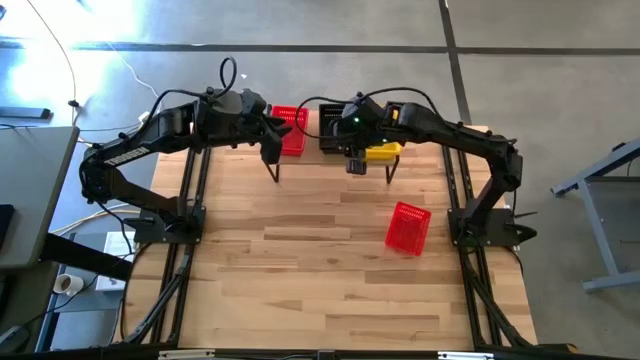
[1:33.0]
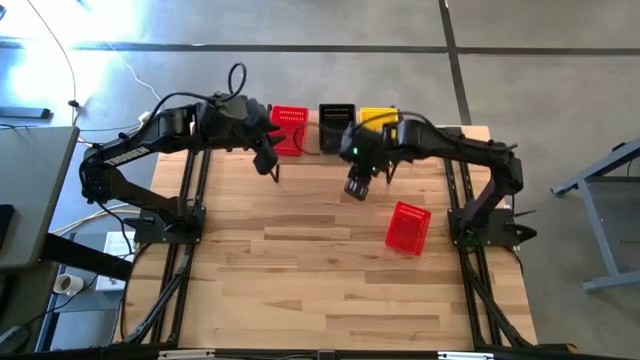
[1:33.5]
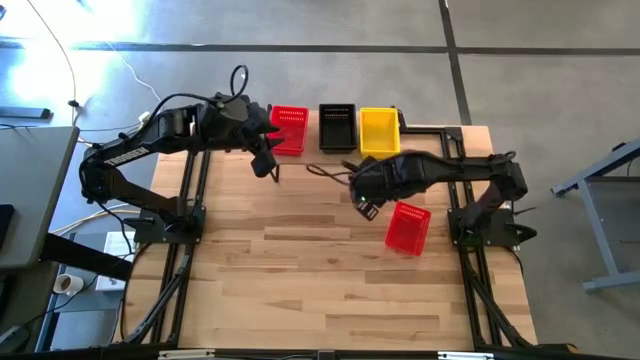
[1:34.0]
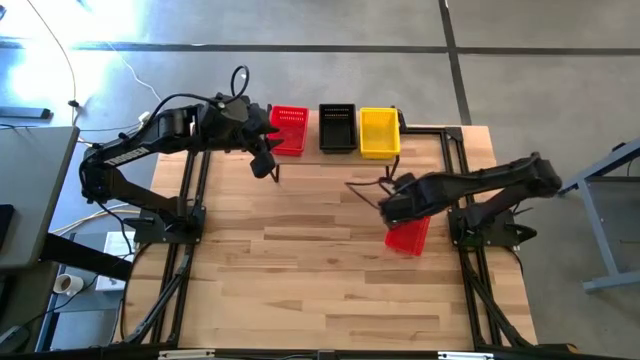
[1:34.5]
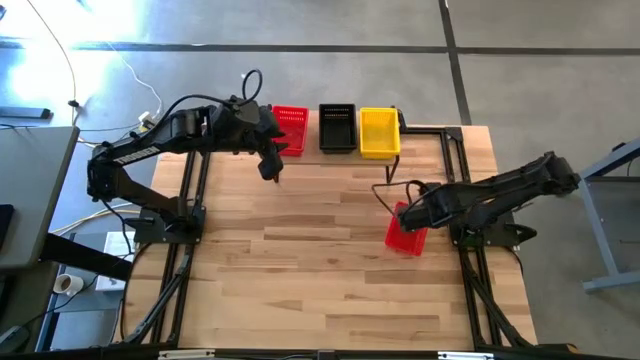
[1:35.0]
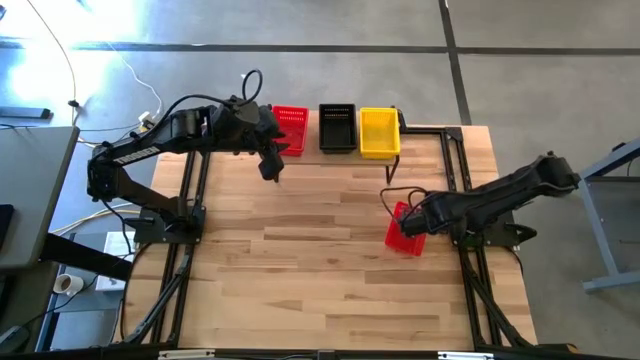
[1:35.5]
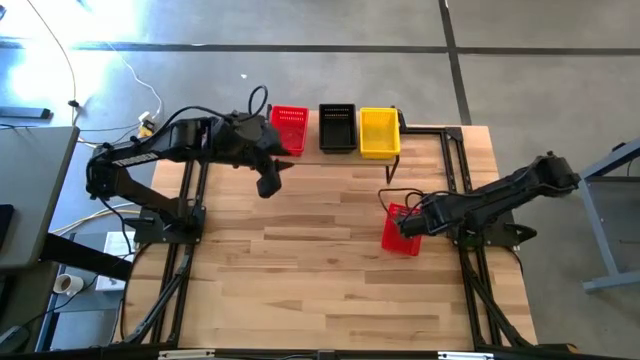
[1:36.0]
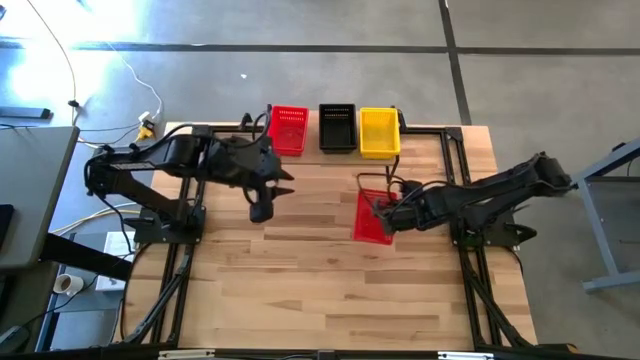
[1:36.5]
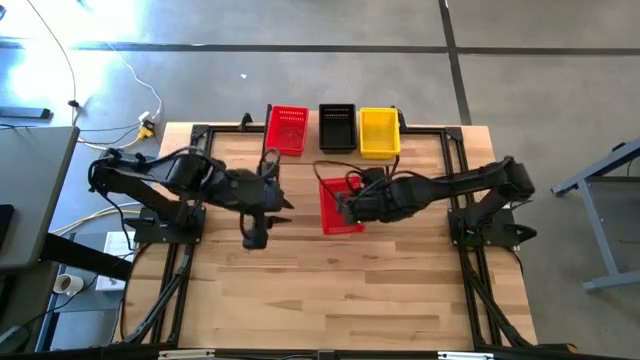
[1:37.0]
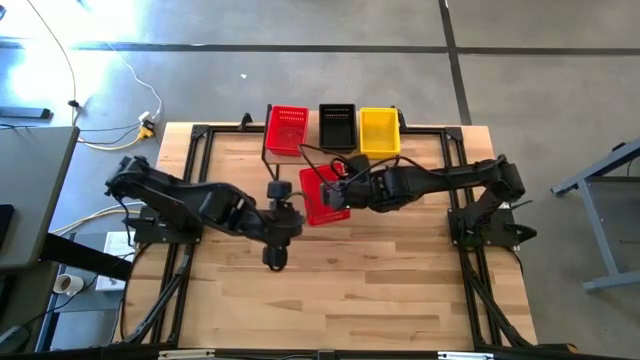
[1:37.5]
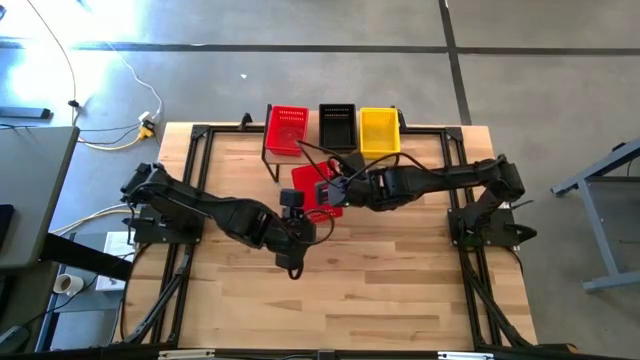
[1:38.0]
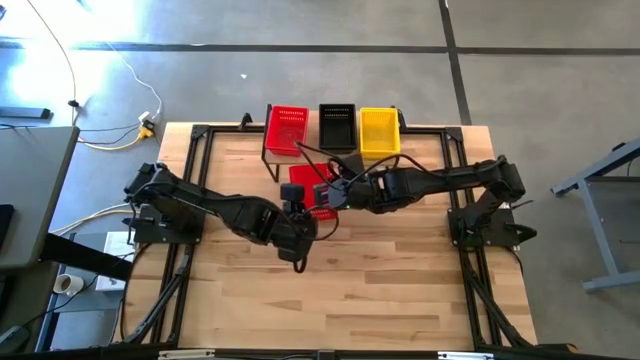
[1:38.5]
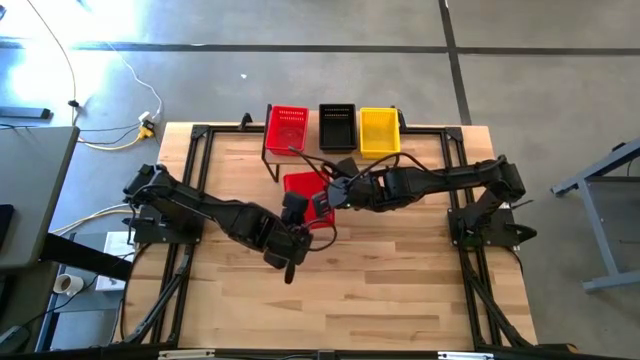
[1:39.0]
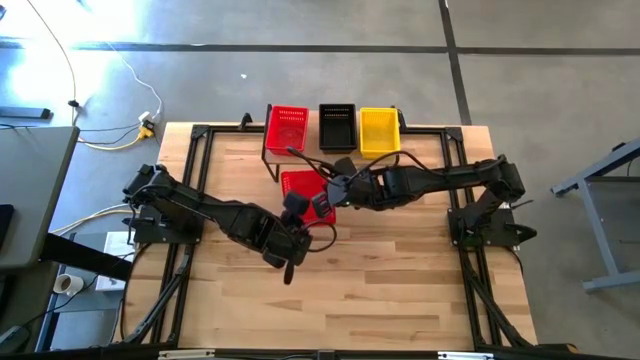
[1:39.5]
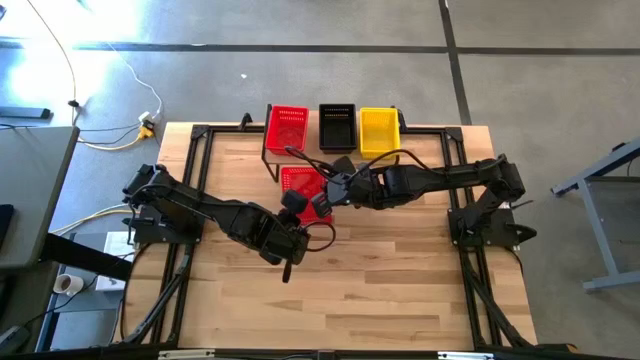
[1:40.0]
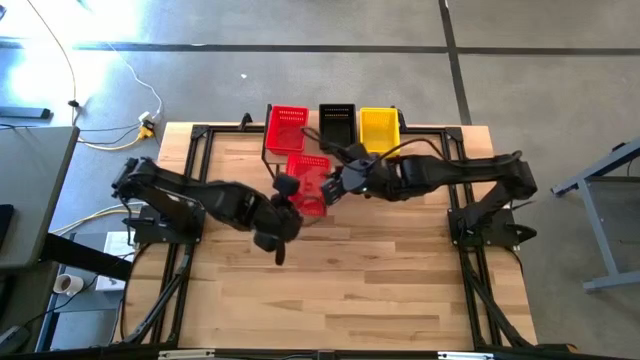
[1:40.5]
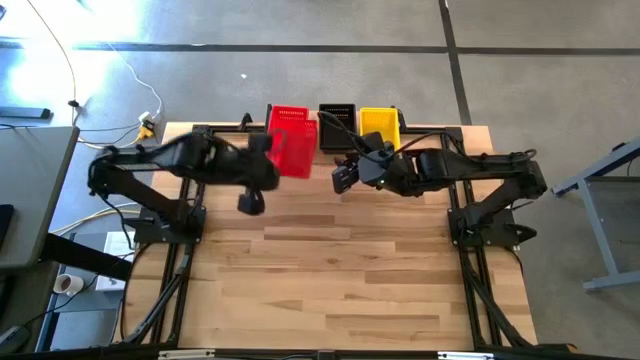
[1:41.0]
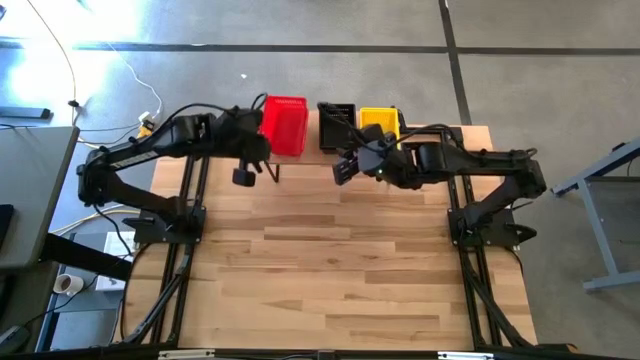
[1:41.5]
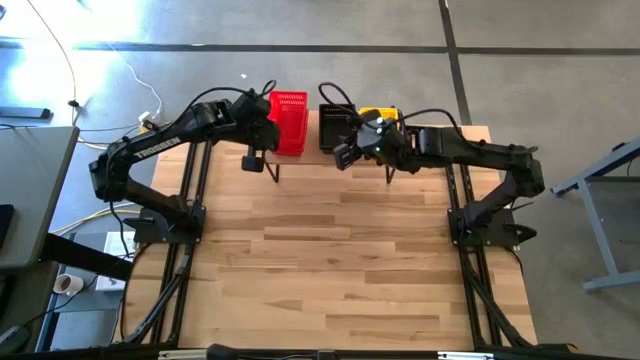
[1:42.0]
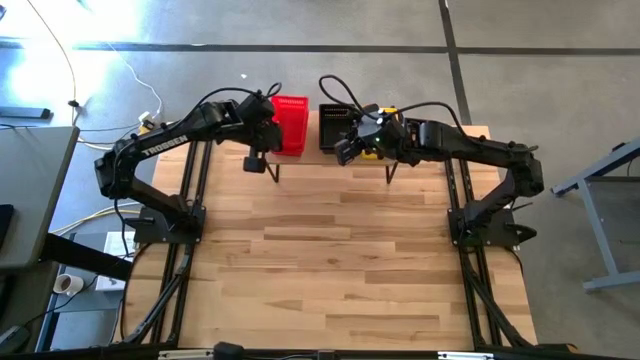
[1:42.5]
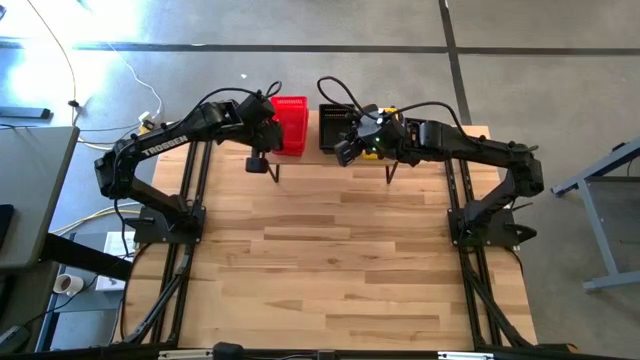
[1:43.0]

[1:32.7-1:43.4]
Task: Stack baskets on shelf by color
Stack the red bin on the top of the red bin on the shelf

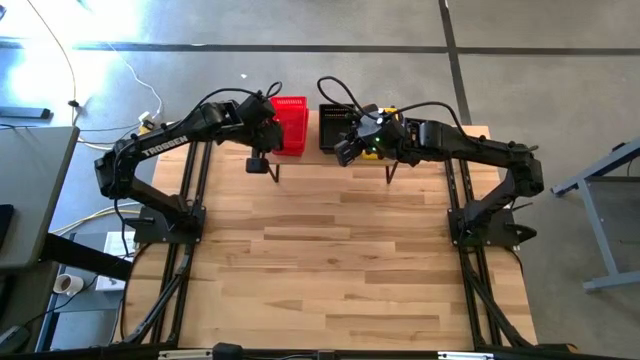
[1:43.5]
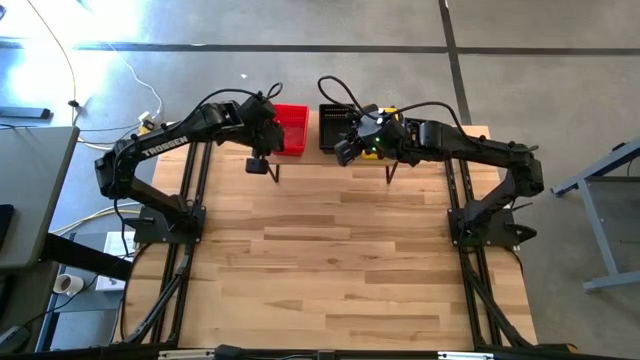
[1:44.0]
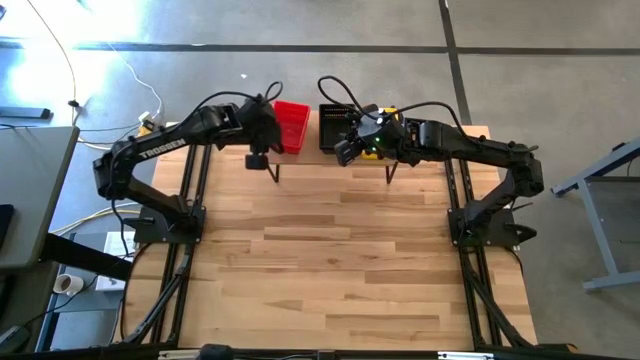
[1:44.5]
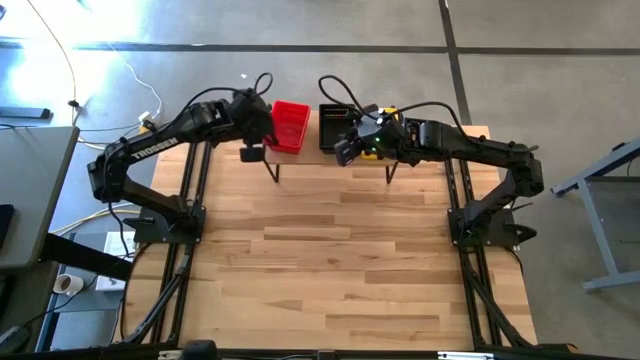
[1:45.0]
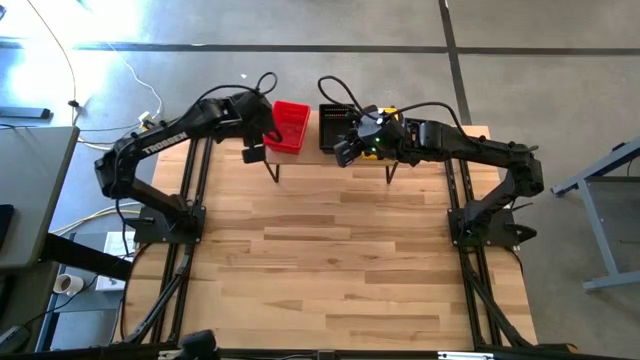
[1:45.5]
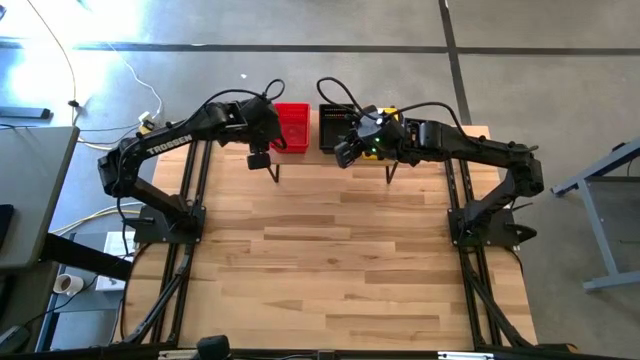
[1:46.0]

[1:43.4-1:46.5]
Adjust the stack of red bins on the shelf

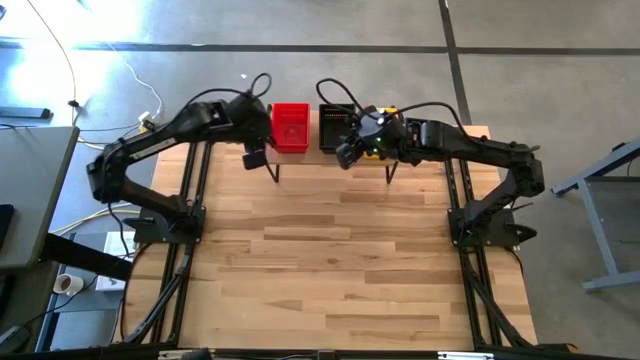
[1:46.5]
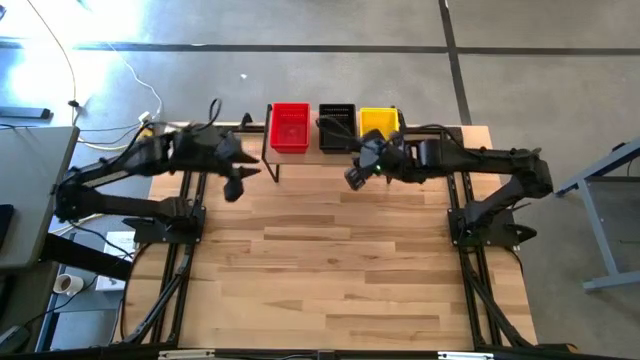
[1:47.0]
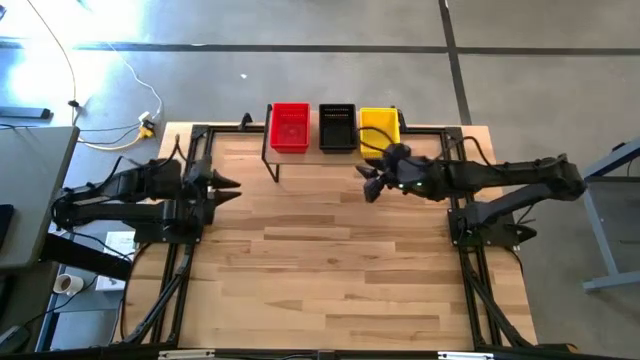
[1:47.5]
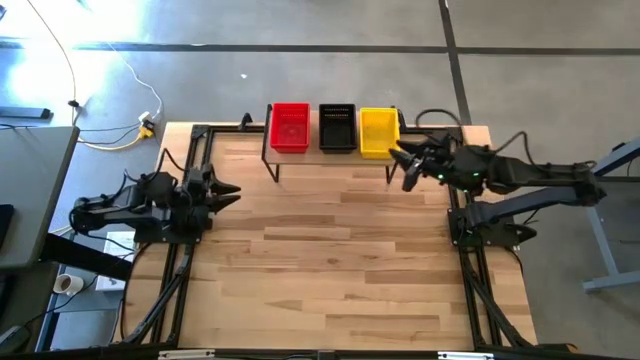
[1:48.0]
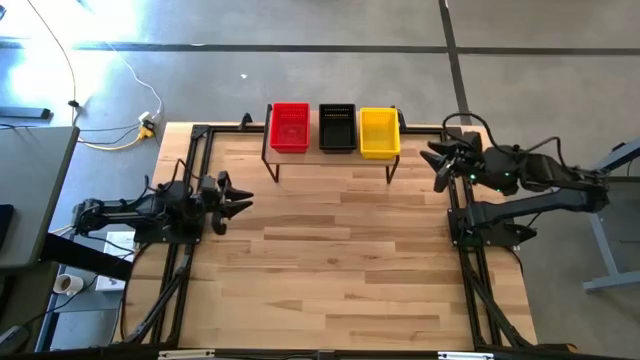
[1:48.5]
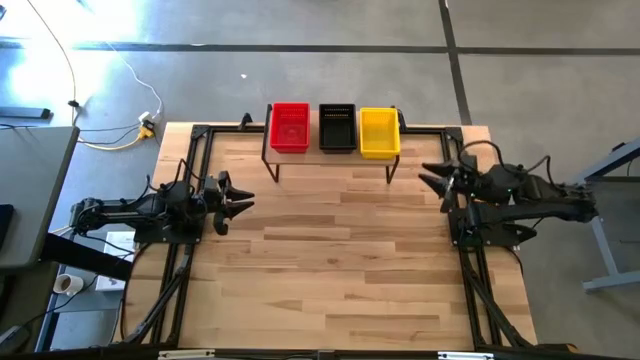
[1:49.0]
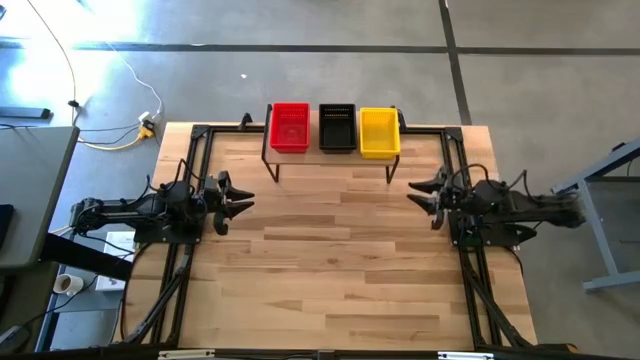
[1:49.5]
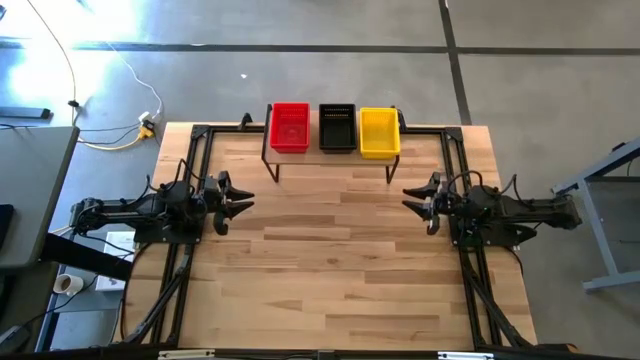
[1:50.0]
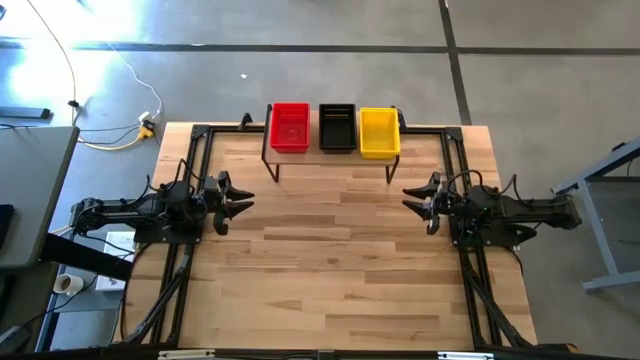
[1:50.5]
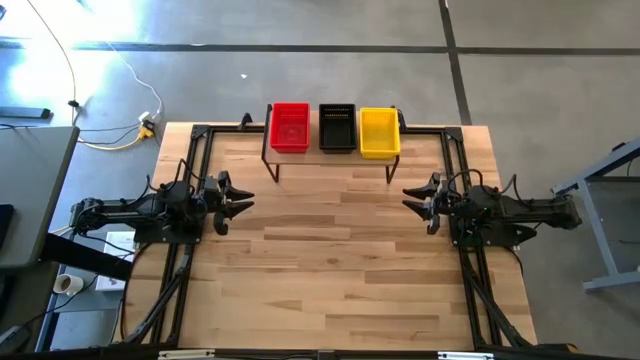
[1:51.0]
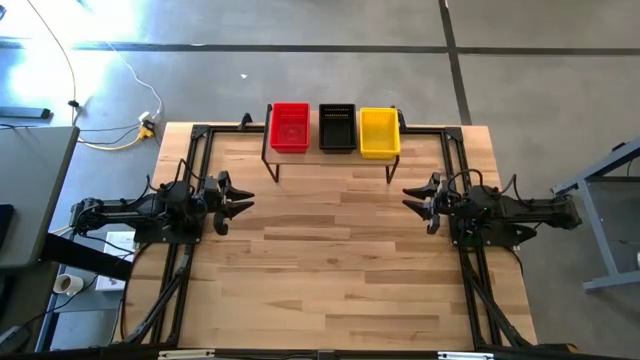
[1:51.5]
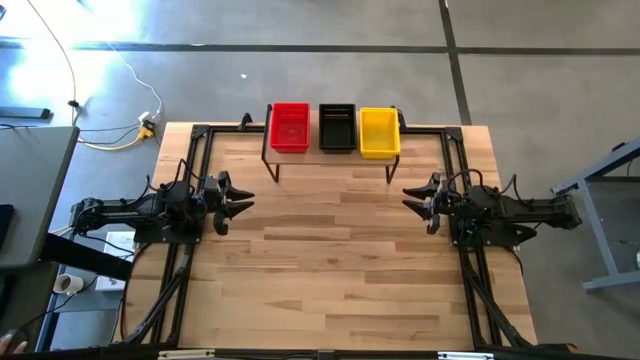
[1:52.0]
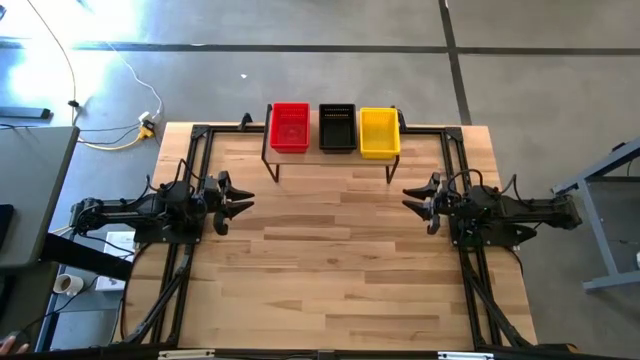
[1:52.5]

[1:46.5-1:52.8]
Return to Home Position

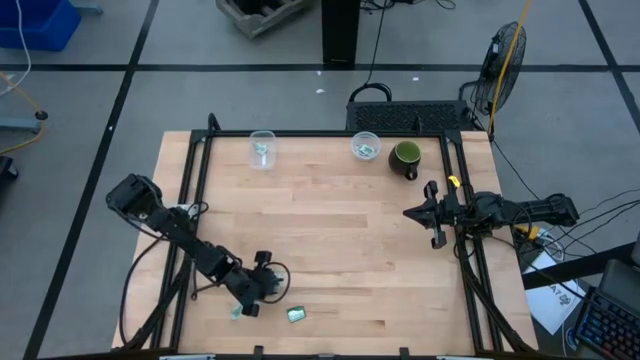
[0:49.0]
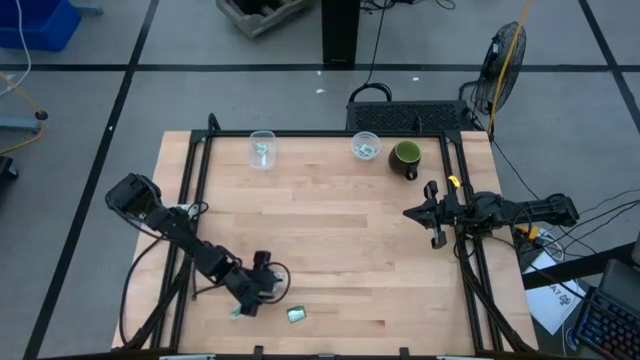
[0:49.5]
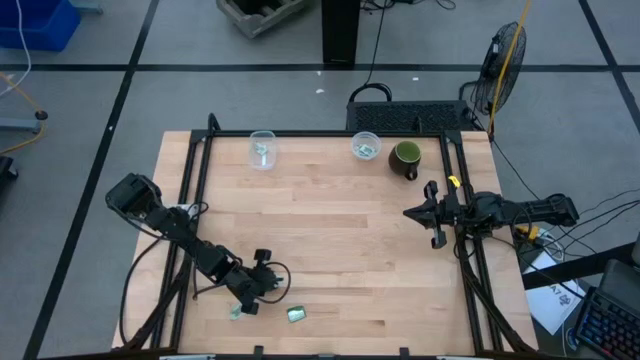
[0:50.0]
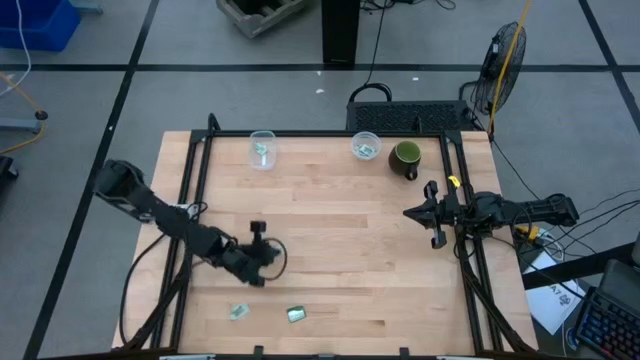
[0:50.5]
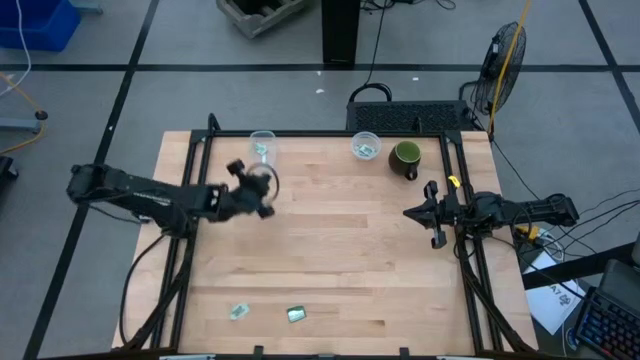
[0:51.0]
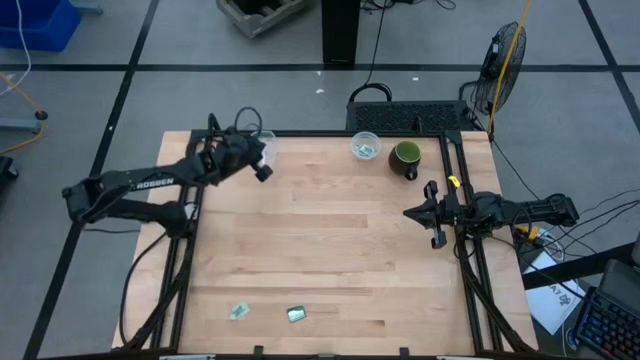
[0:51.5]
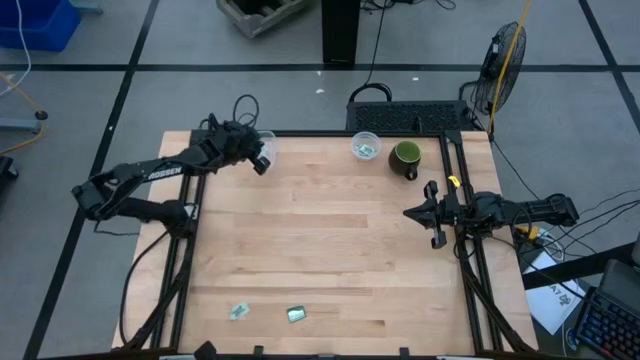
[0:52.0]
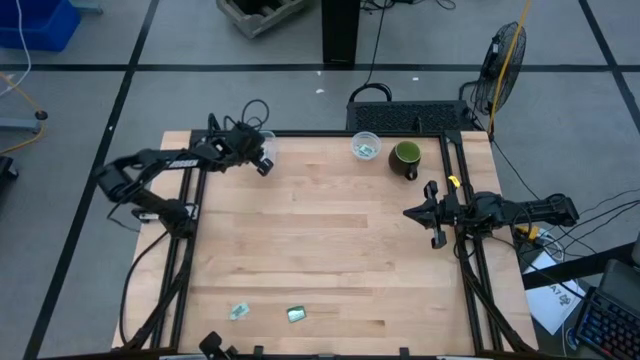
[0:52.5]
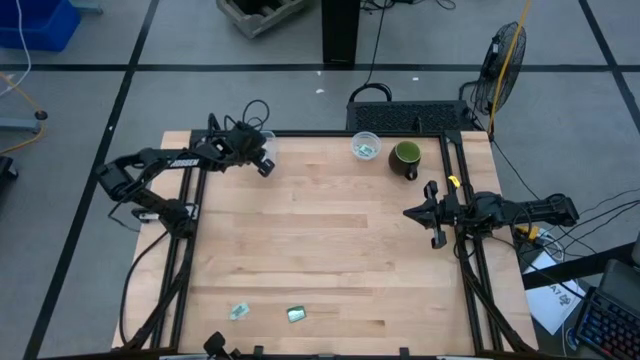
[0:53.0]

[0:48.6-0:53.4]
Task: Pick and place items into bin
Put the green stevia packet into the left transparent bin
